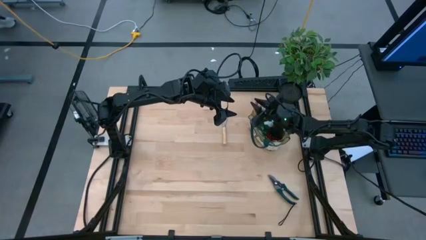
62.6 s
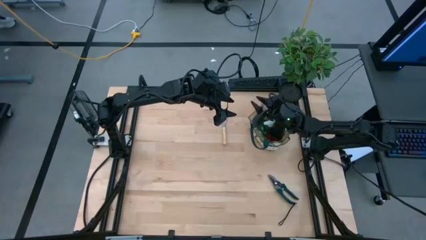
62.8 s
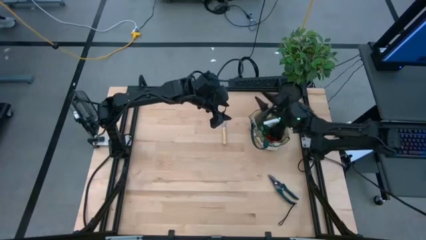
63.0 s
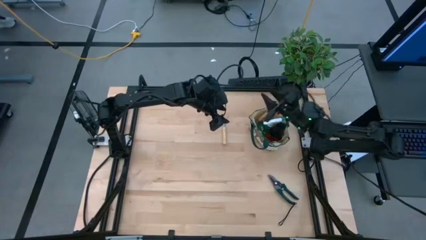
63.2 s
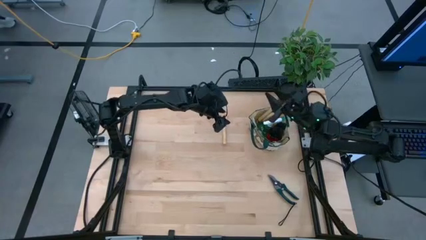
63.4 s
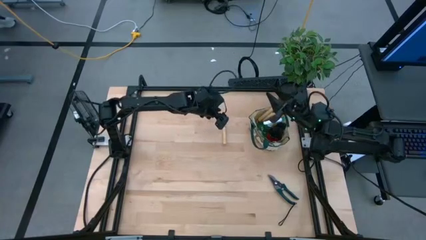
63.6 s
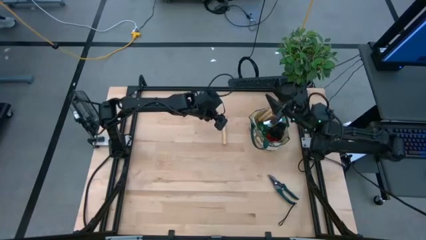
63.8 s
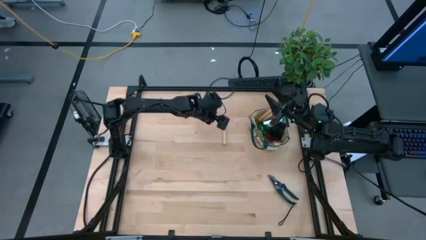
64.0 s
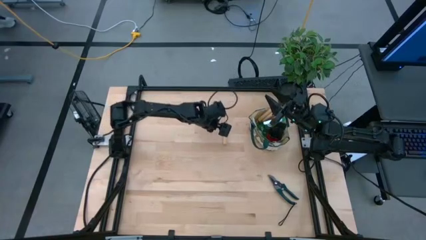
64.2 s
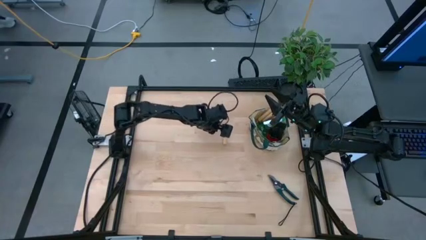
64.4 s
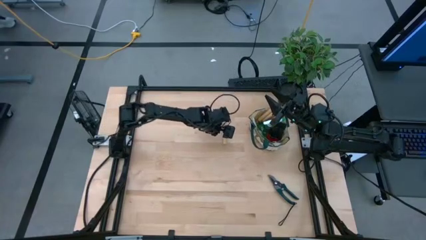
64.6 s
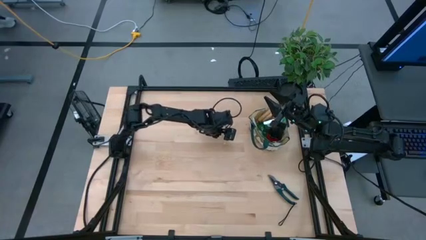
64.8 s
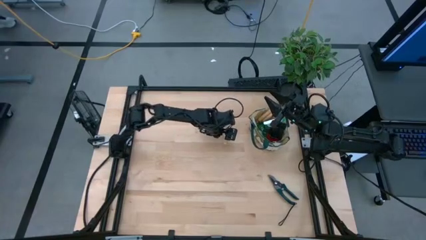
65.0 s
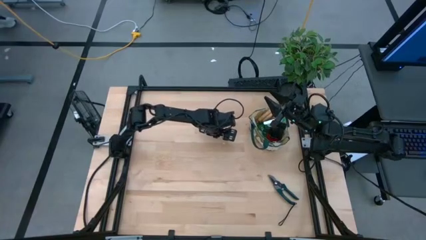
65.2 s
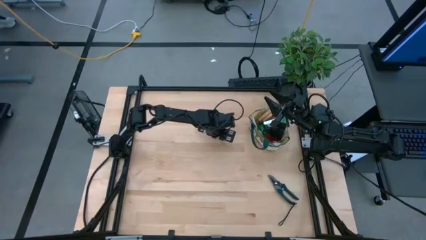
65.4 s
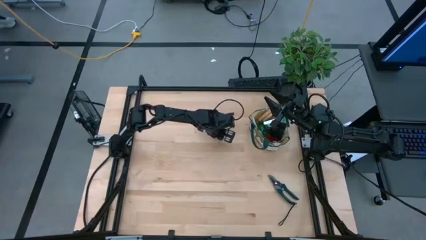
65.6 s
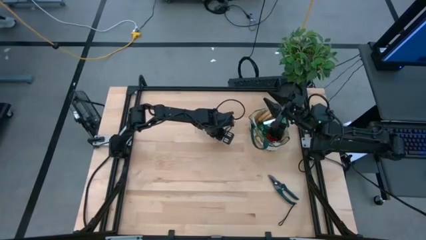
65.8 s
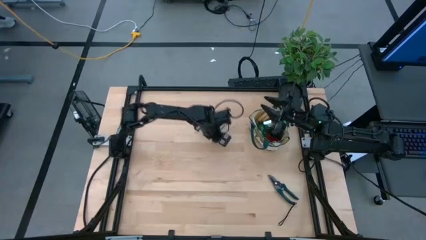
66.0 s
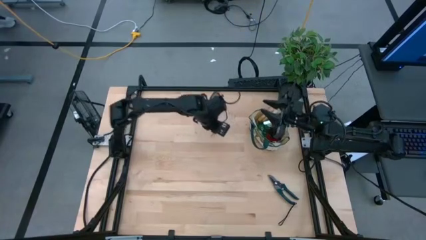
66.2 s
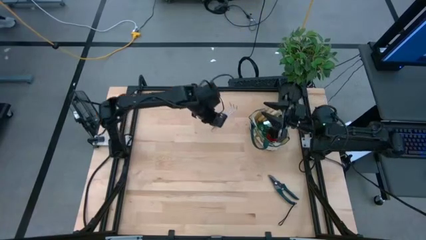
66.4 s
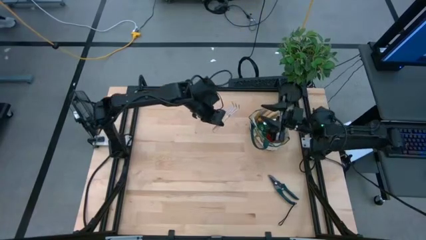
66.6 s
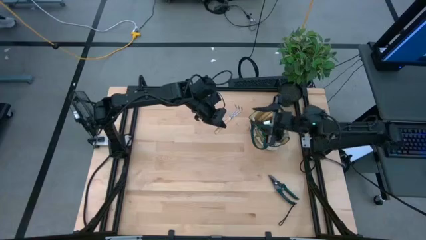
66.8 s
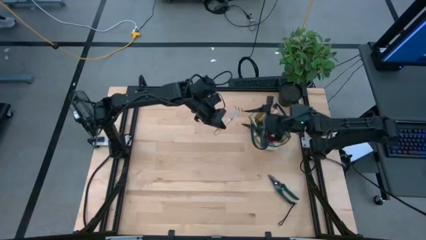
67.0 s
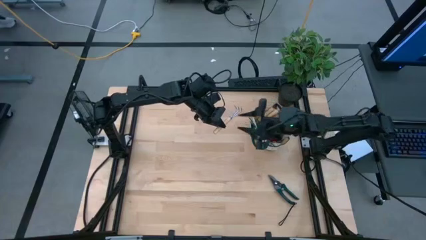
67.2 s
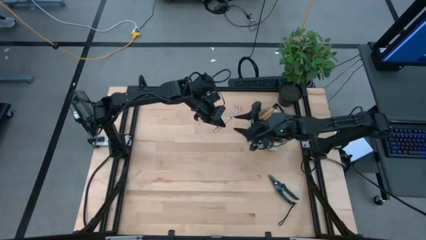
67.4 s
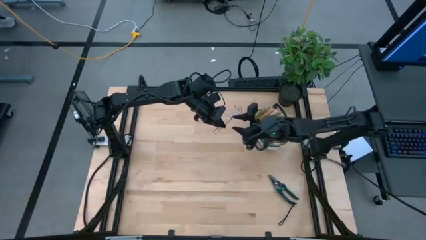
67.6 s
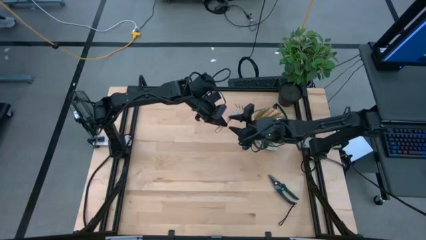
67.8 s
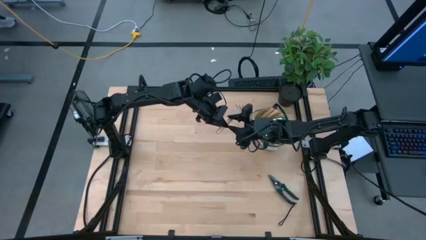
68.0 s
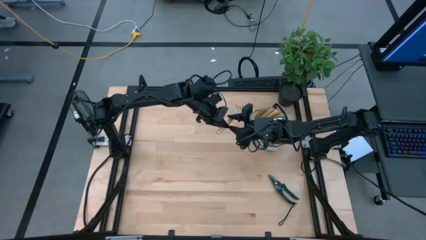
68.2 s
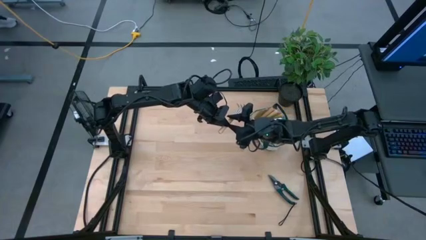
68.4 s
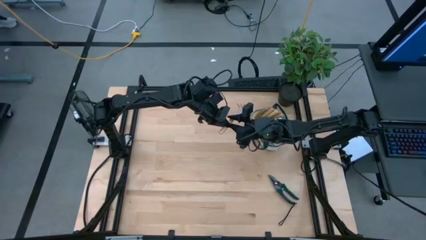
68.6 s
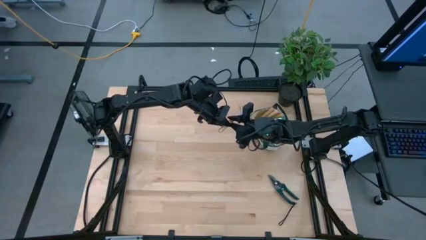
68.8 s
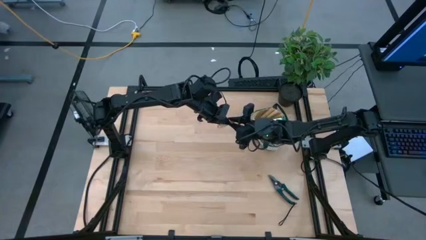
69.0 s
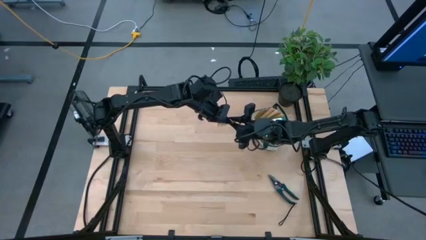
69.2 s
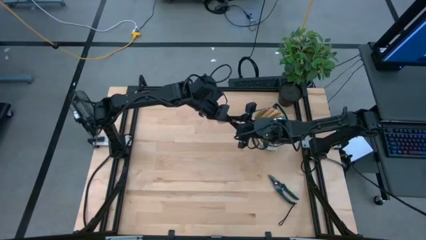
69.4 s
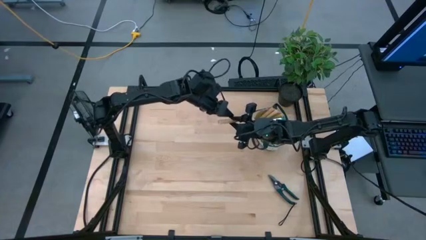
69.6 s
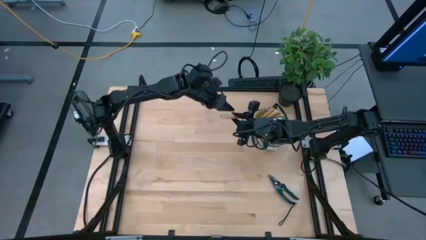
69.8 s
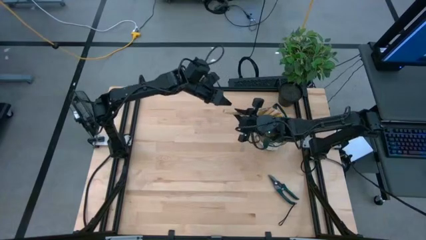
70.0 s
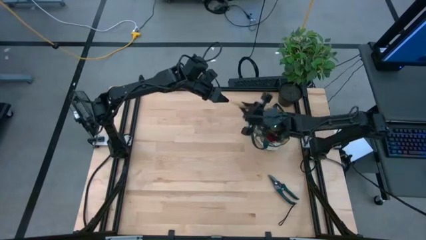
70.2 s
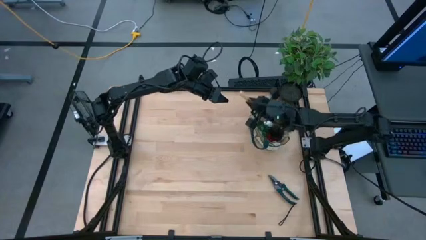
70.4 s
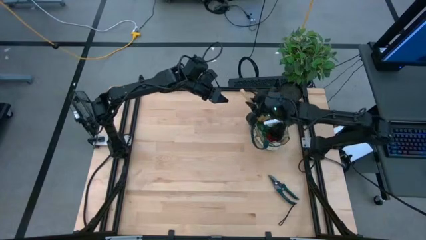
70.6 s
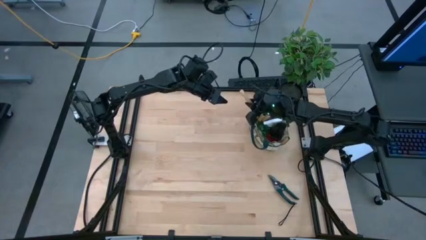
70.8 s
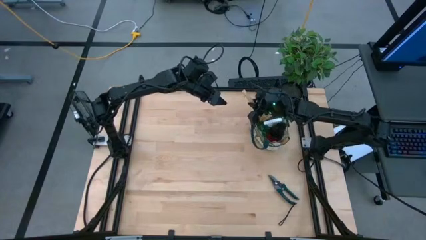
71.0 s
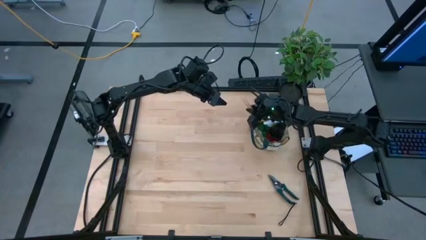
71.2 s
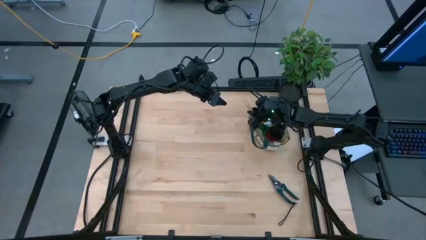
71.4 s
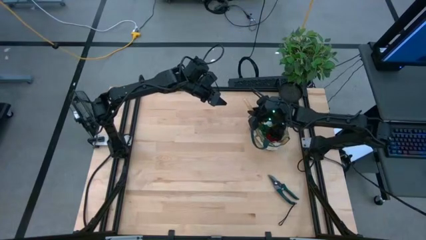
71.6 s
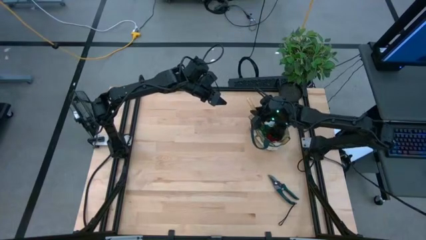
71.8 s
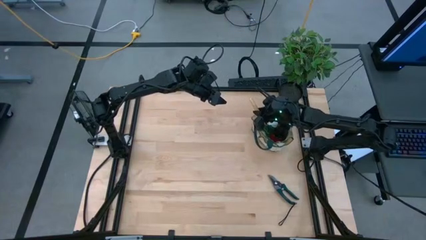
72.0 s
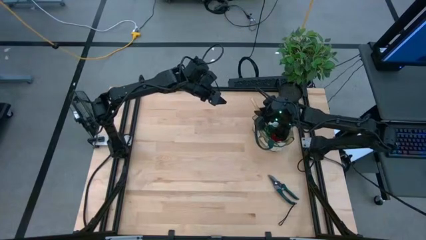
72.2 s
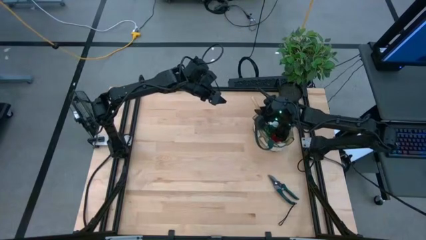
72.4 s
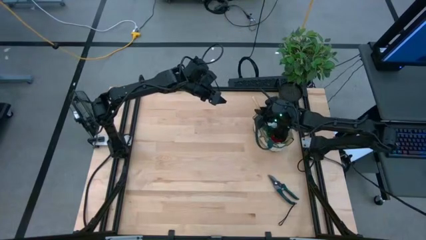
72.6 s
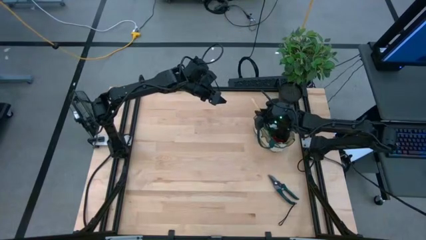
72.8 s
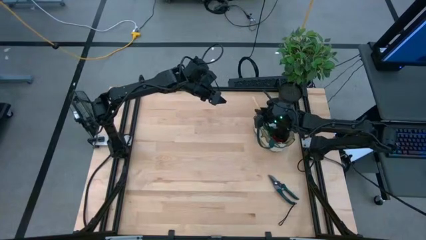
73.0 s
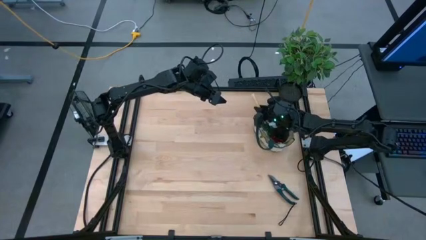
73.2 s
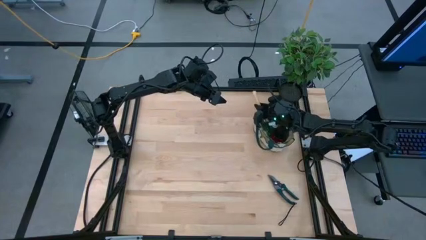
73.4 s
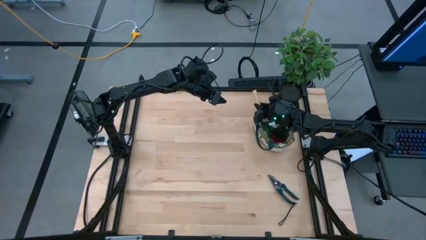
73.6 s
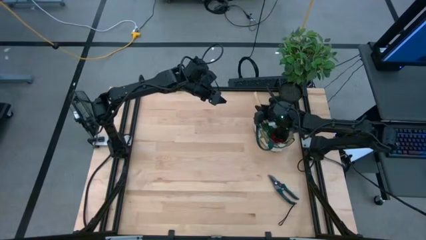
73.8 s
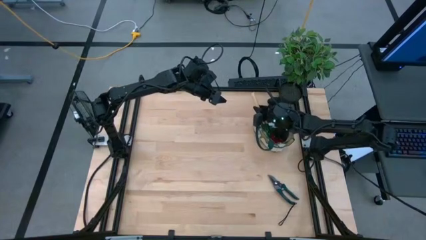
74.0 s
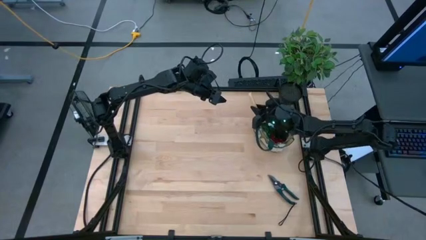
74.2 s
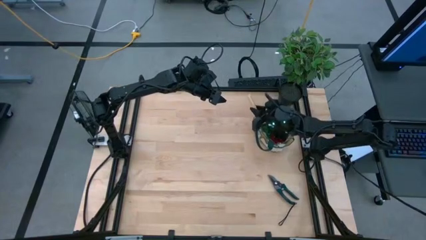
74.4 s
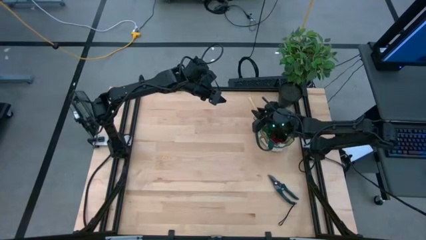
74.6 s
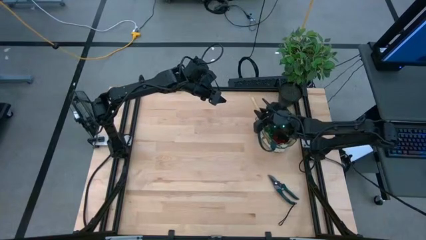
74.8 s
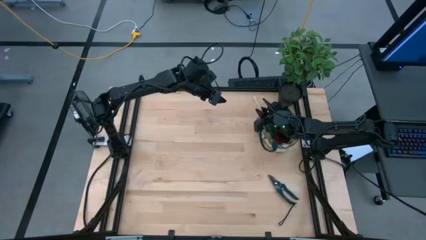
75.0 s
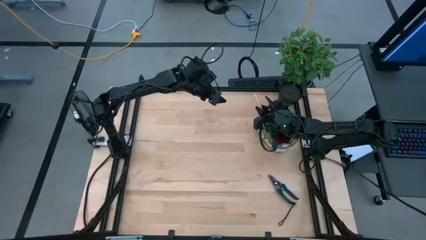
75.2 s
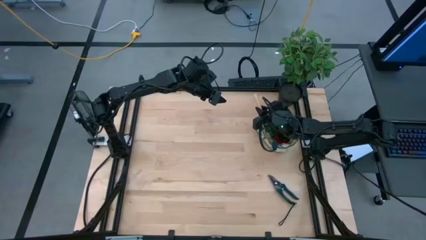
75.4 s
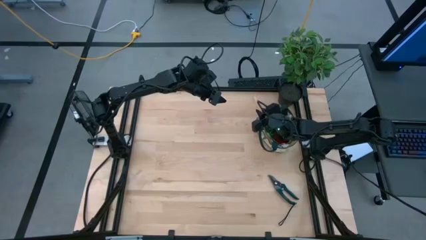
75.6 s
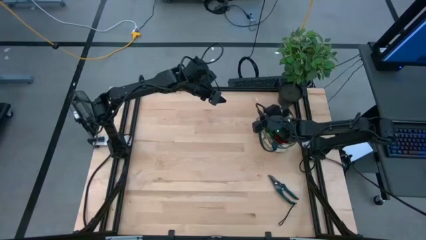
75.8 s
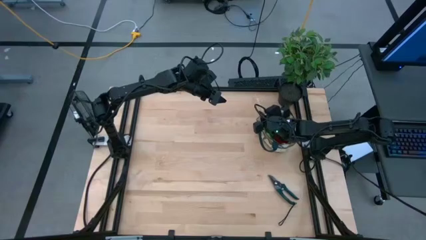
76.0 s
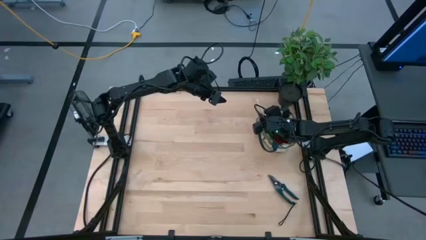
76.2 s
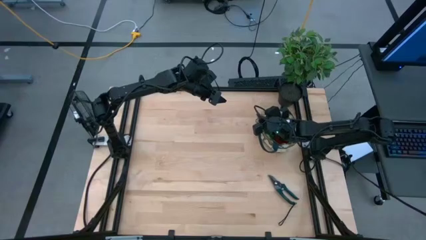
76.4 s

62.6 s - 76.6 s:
Task: Pick & Place Garden tools in Gardening bag
Put the brown brown hand rake into the gardening bag

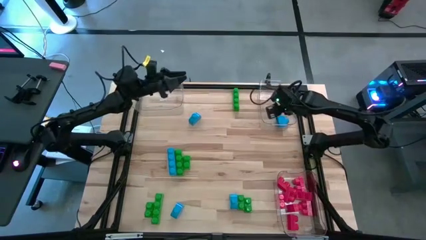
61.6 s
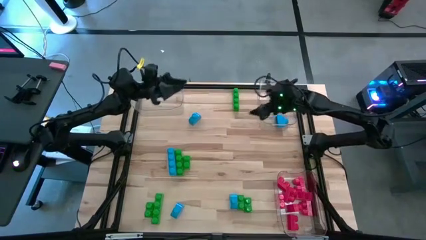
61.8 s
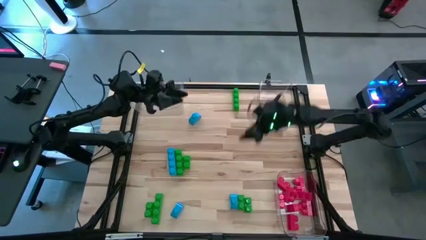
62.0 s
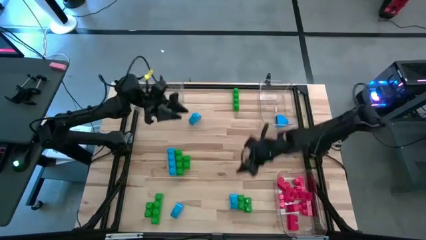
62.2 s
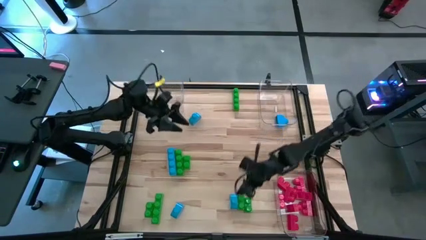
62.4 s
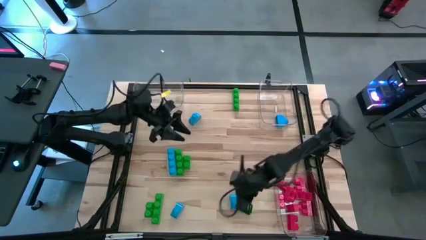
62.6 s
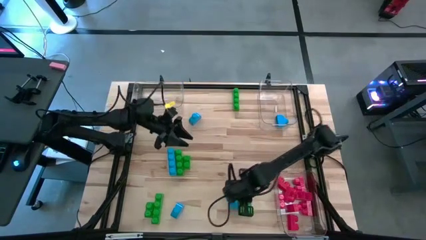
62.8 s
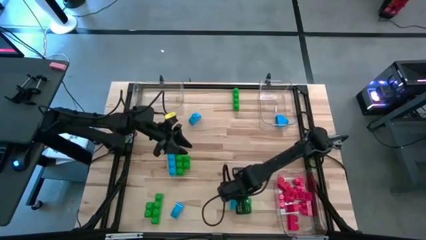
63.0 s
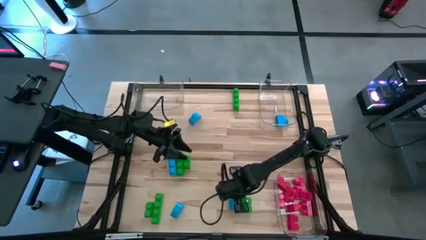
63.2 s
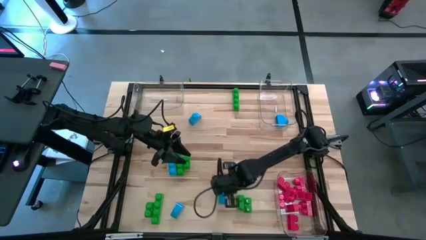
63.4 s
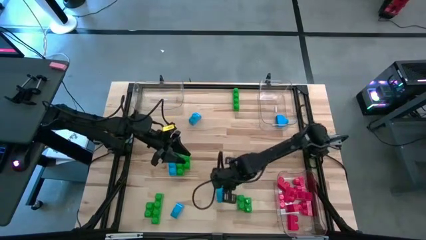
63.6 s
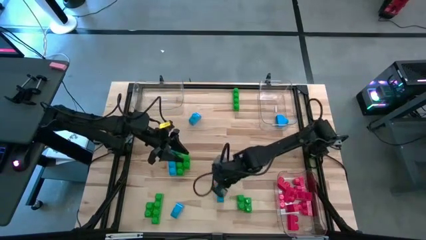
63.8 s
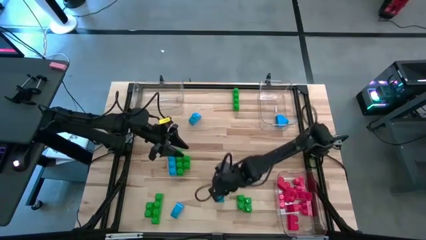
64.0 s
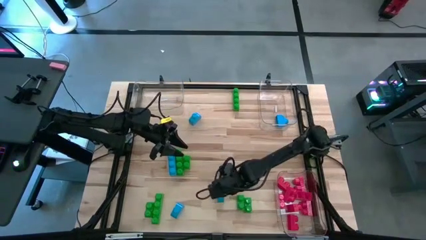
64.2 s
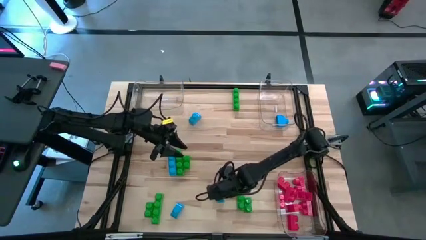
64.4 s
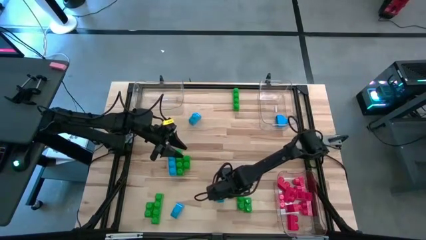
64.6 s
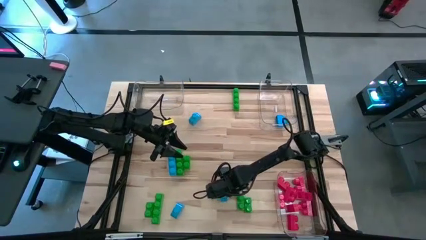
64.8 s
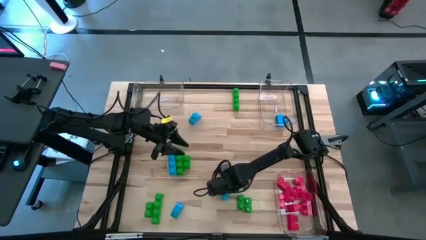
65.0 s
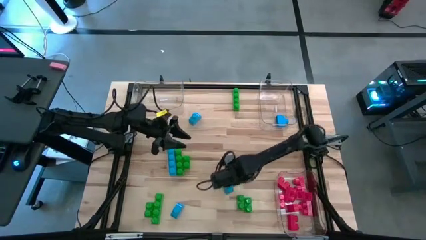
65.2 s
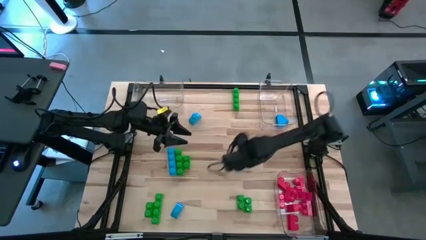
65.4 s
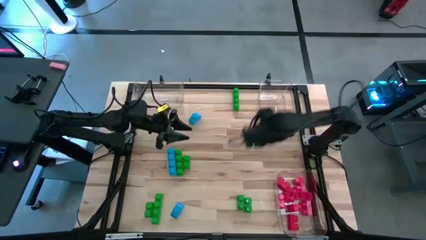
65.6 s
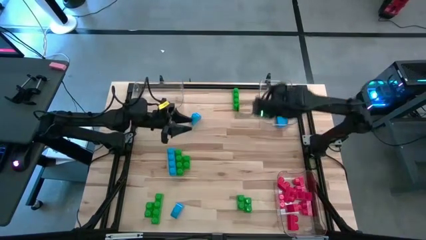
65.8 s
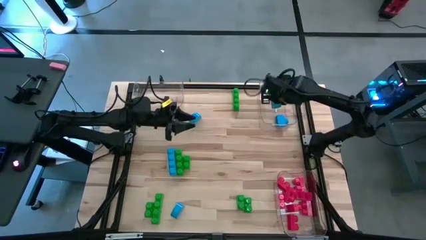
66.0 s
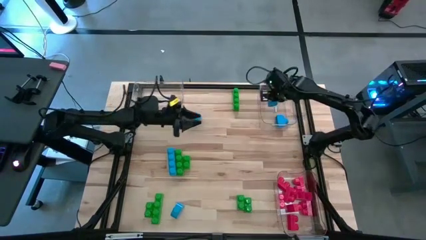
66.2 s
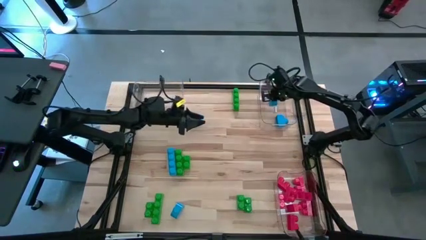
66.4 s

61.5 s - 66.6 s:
Task: Sort blocks
Put the blue game piece into the top right transparent bin
